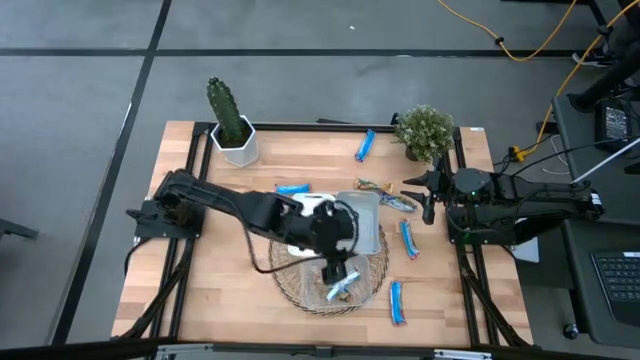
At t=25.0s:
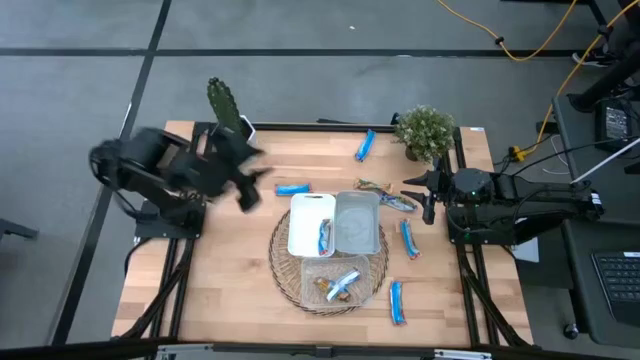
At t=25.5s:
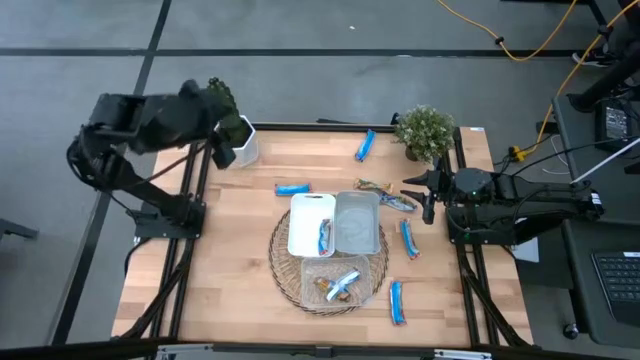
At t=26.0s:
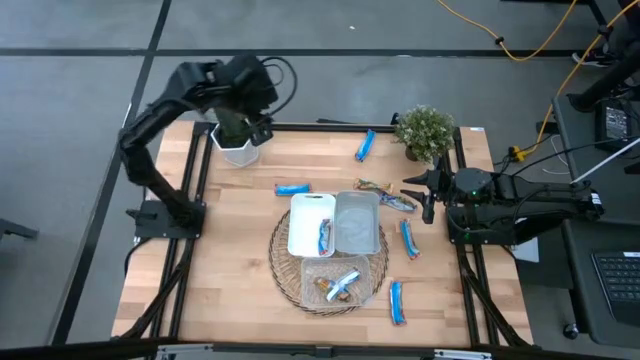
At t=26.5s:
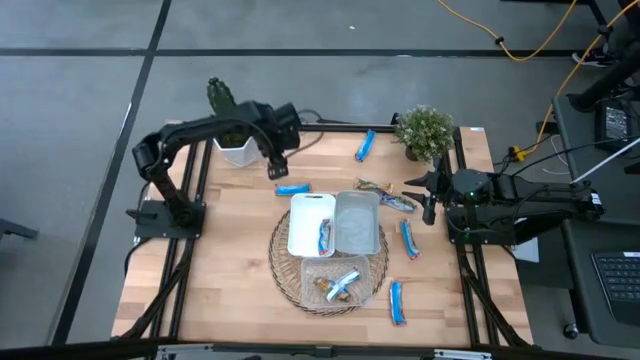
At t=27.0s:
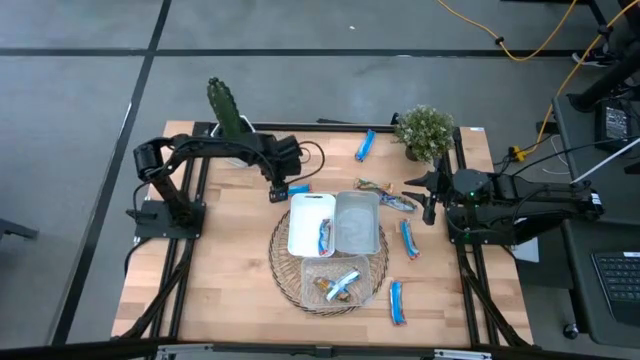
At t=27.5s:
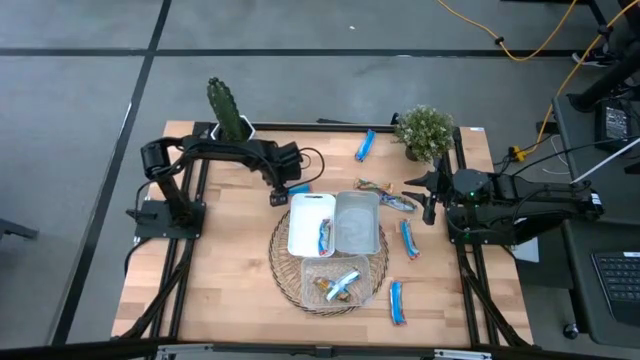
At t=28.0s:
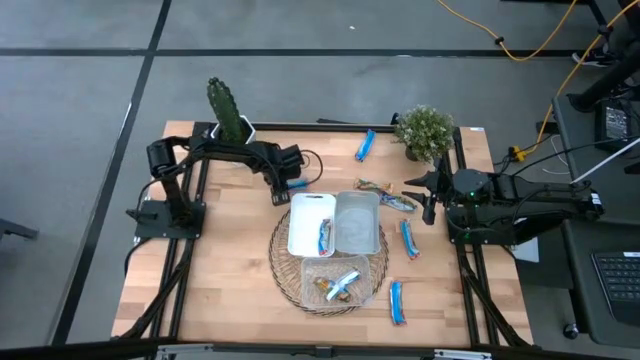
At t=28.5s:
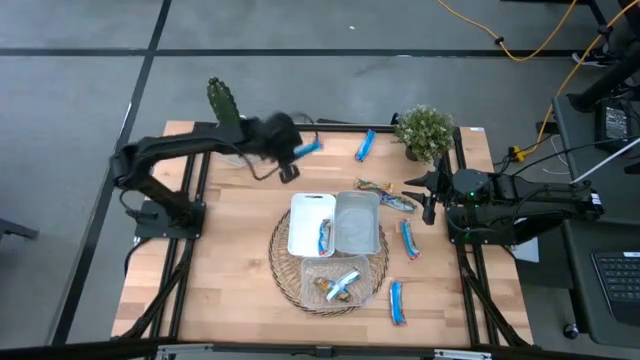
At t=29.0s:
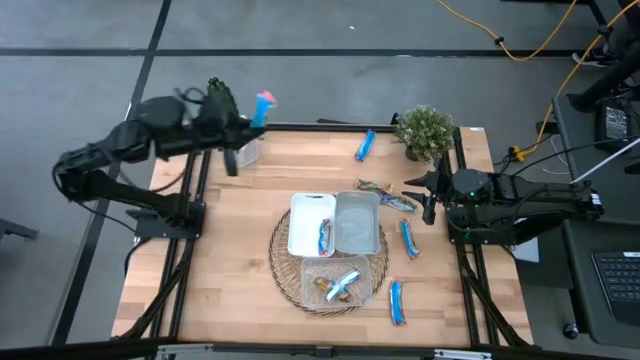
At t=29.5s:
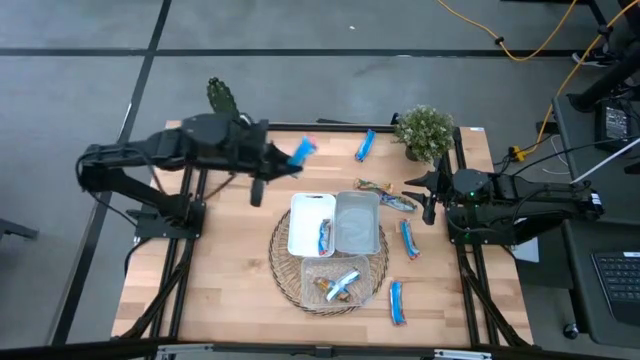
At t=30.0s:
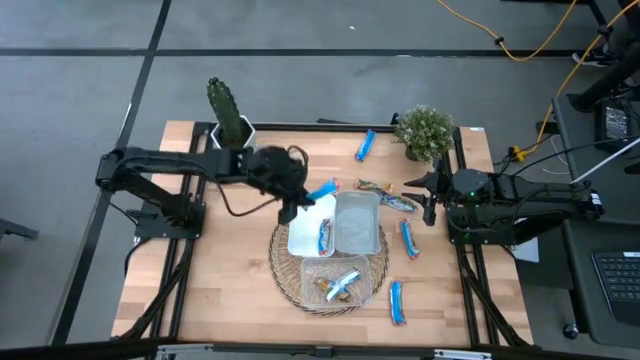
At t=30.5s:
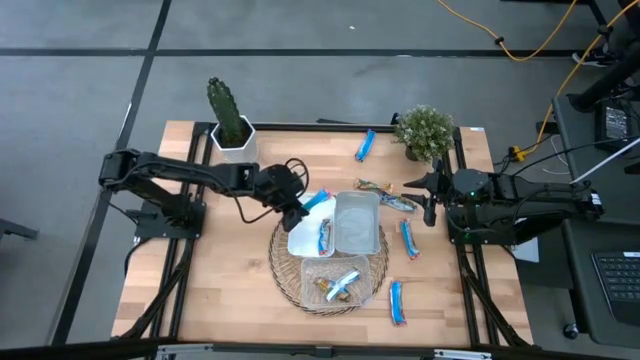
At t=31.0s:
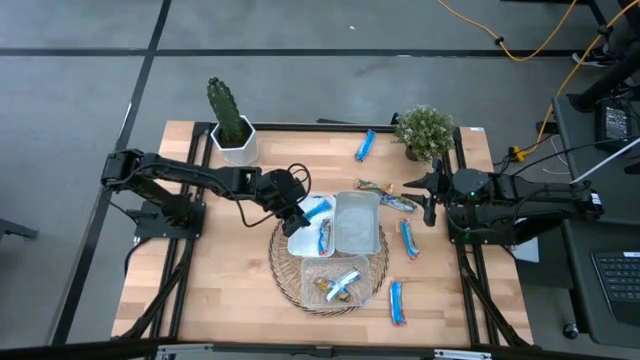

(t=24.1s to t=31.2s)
Task: Pick and place Granola Bars by type
Put the red granola bar into the white bin

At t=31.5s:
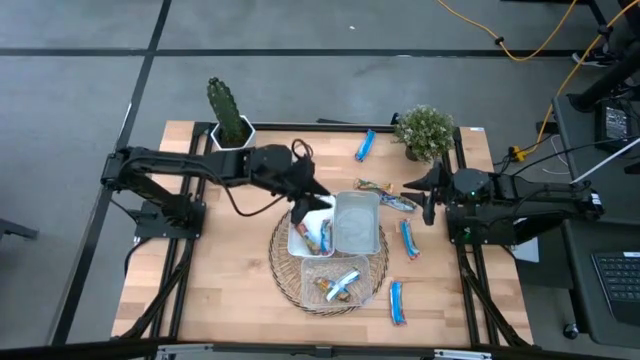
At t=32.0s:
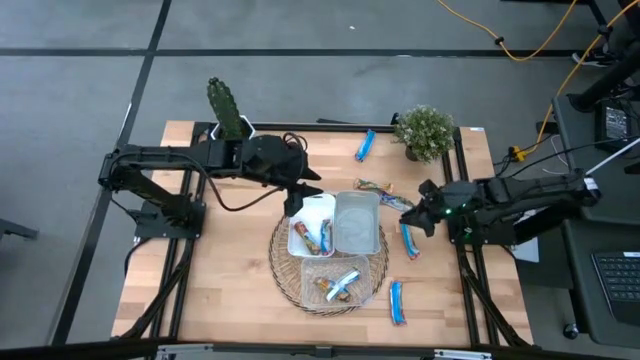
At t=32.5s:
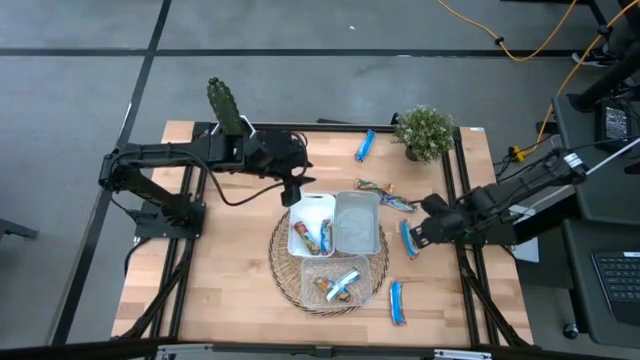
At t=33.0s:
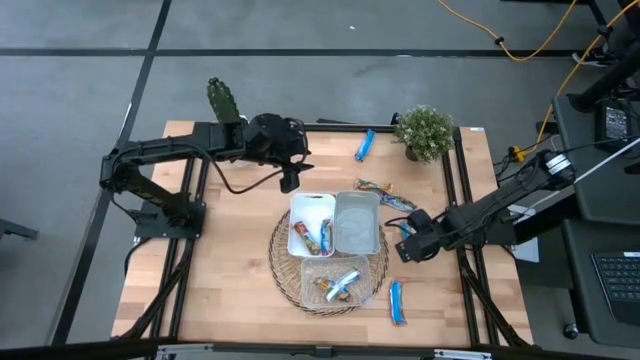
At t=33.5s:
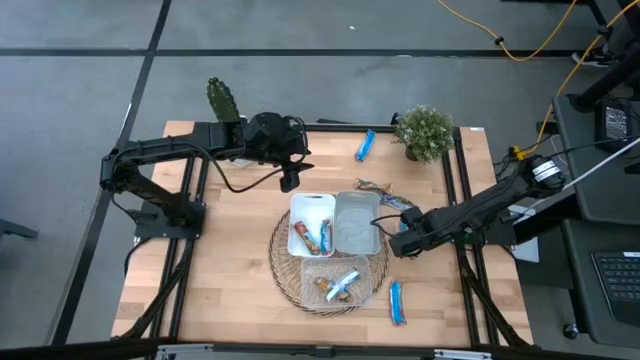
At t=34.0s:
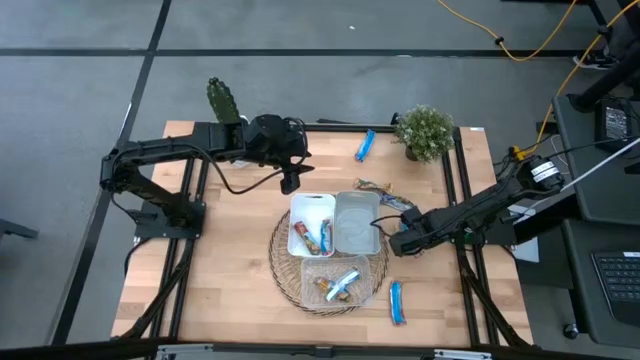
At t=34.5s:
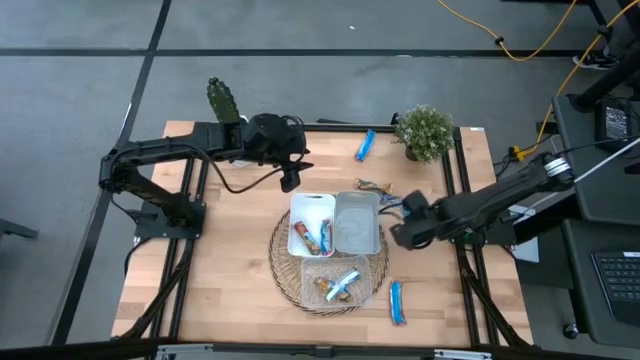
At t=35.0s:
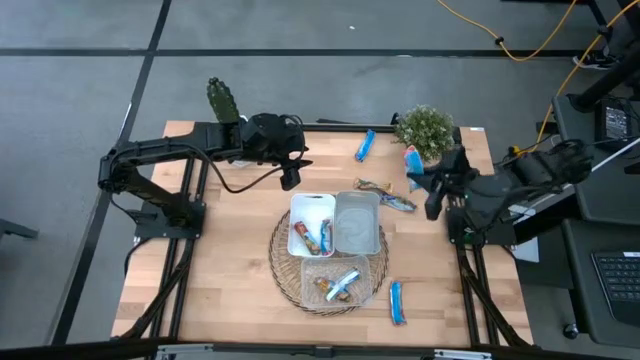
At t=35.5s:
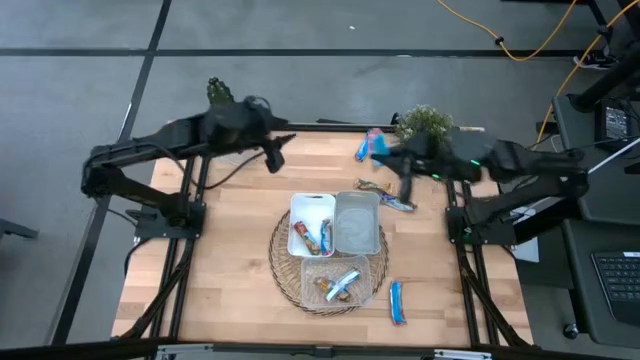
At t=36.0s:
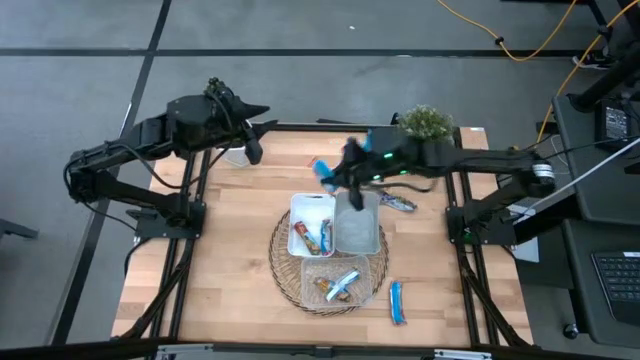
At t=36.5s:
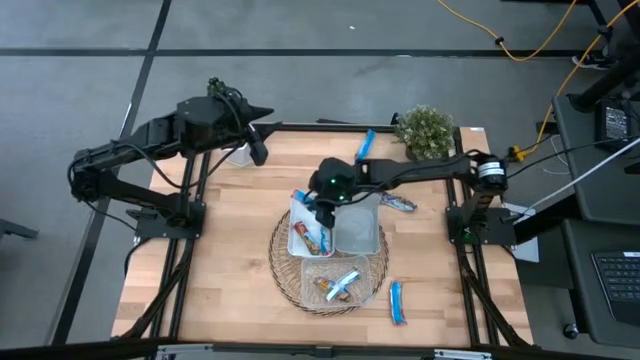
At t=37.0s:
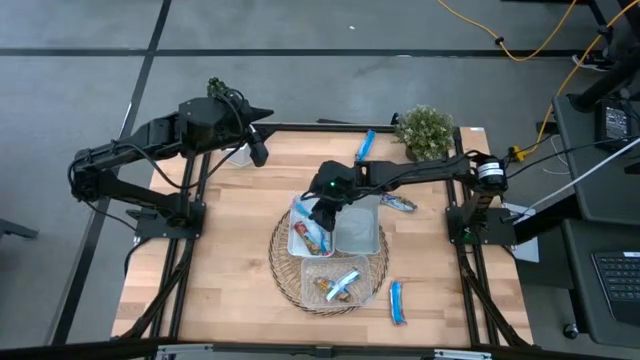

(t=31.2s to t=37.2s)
Put the red granola bar into the white bin

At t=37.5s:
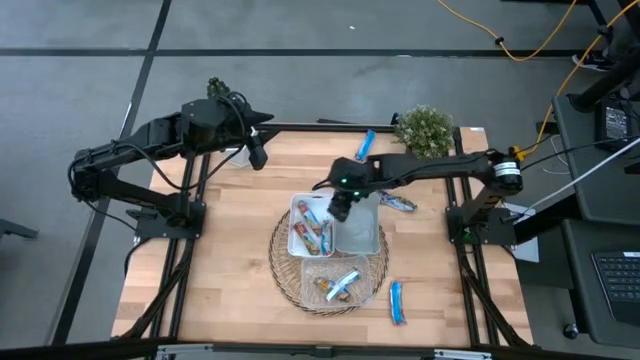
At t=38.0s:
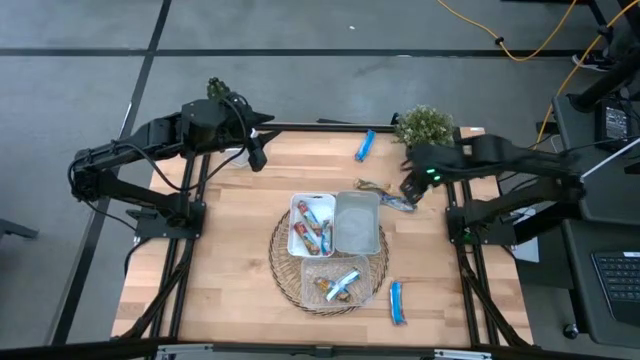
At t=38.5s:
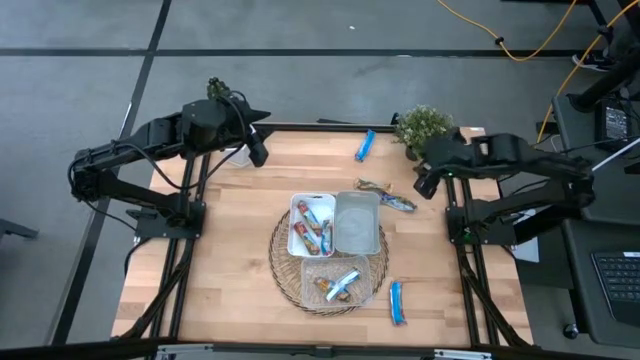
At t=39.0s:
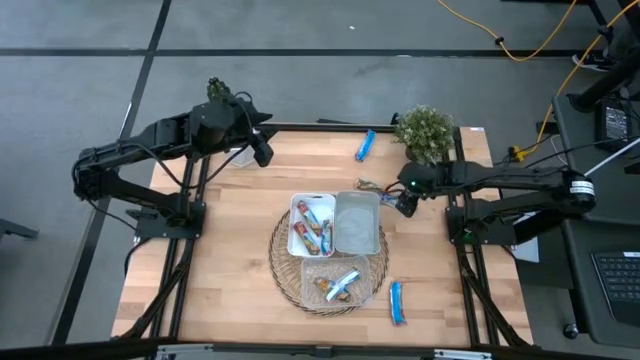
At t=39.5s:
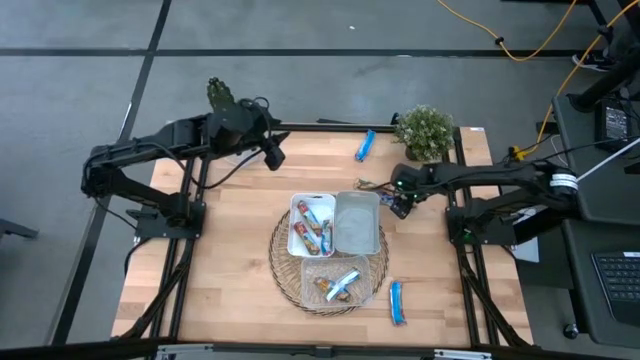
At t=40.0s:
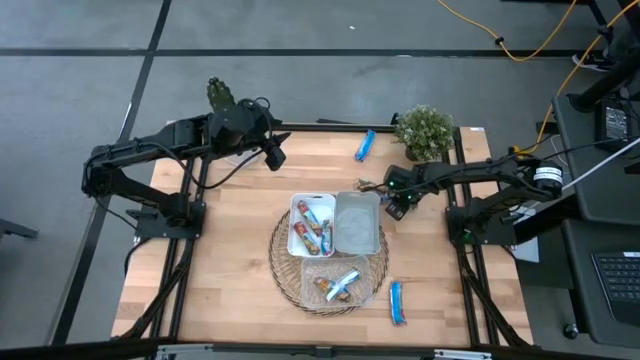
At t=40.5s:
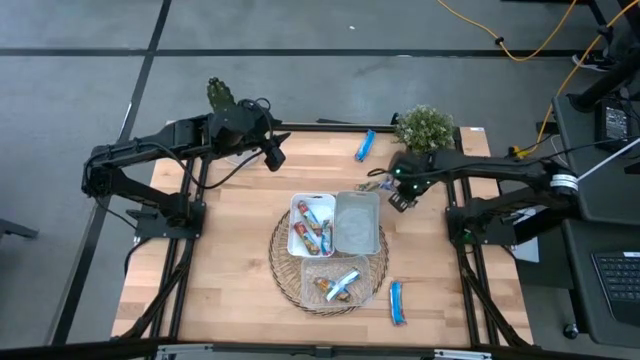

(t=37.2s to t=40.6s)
Put the blue granola bar into the gray bin

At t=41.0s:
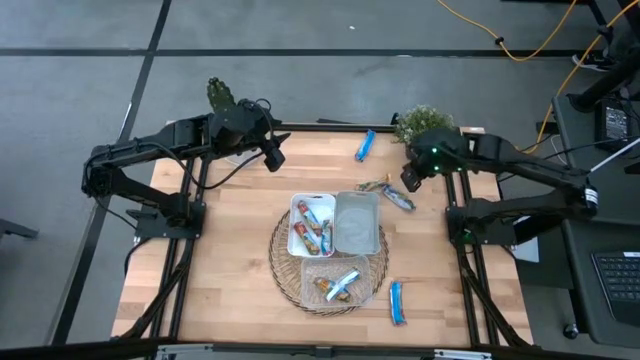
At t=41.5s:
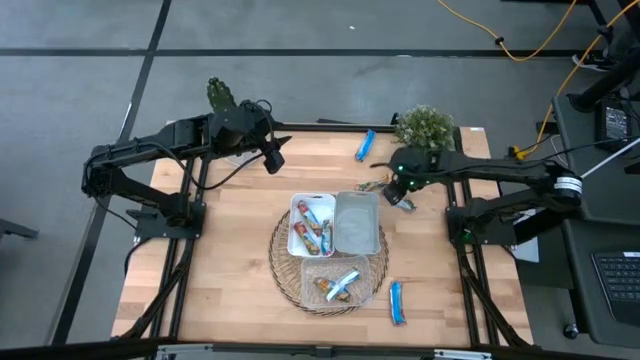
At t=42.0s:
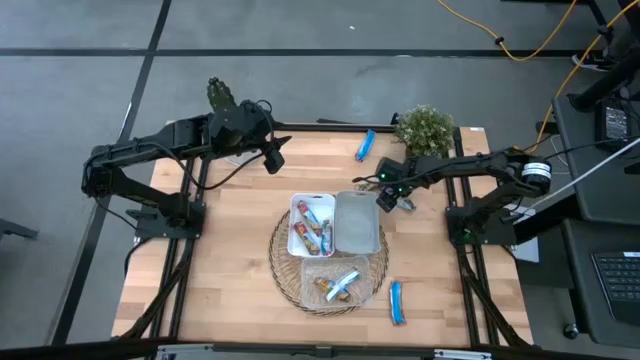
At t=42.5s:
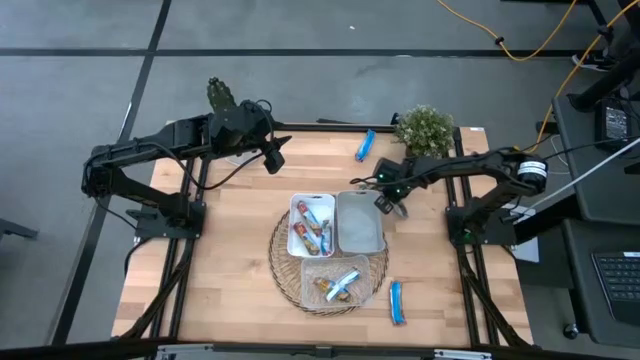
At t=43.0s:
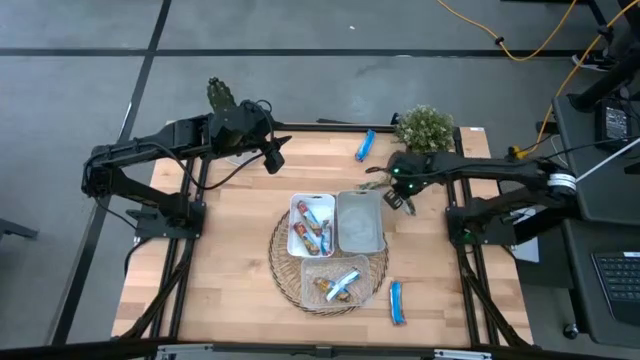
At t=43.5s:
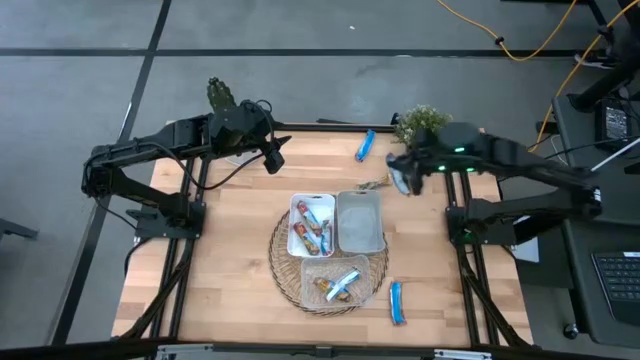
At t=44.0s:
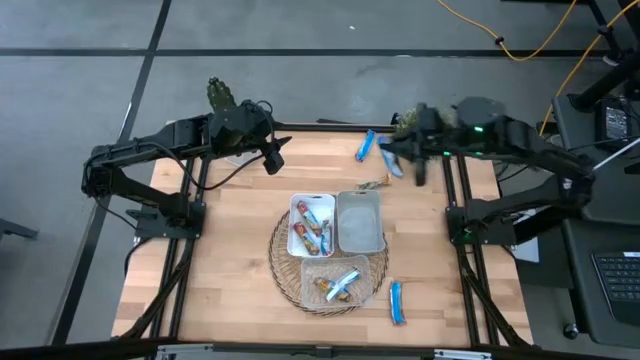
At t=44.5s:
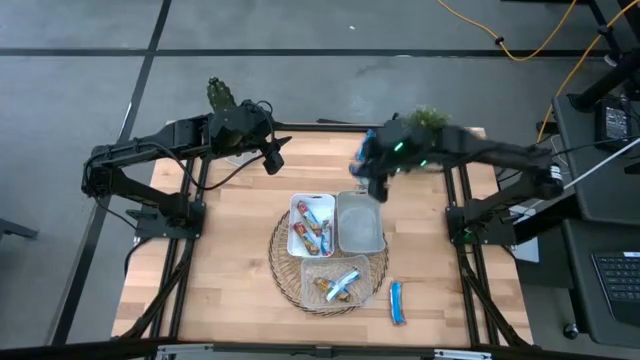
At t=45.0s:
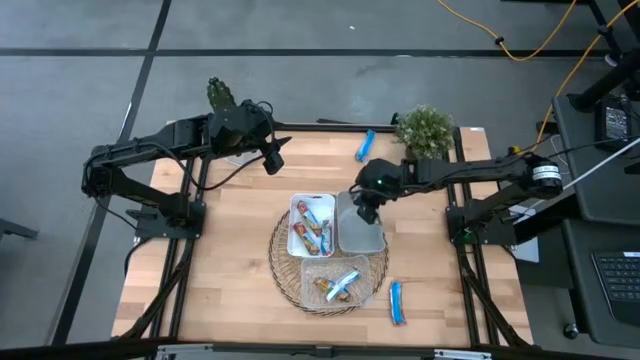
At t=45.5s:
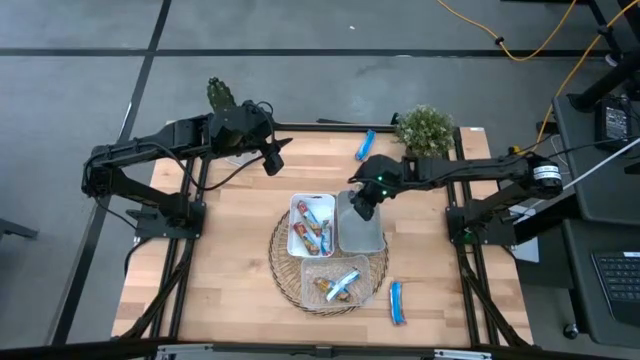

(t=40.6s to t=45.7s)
Put the blue granola bar into the gray bin

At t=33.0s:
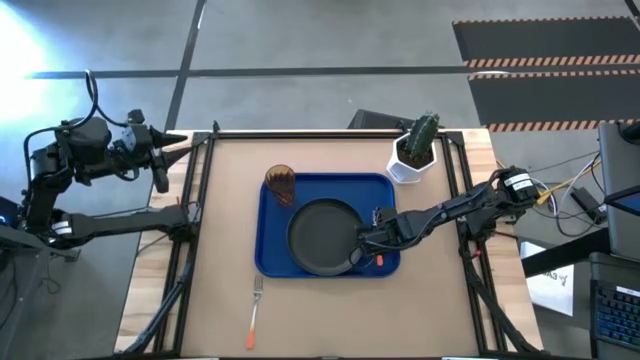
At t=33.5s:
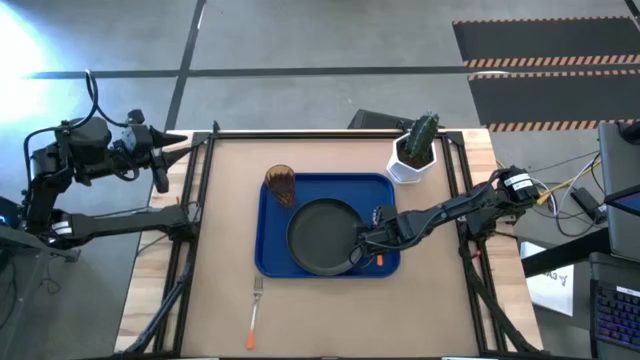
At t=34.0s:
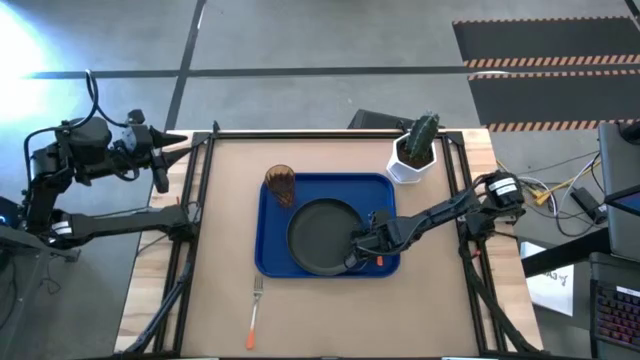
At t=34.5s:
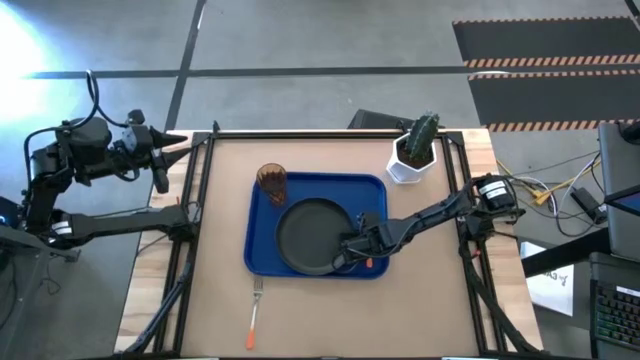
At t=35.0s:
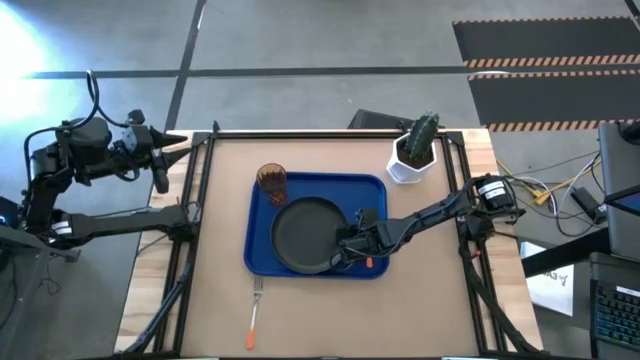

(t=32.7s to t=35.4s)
Task: Pick and place plate/cup/fork/spoon on tray
Adjust the black plate on the blue tray
